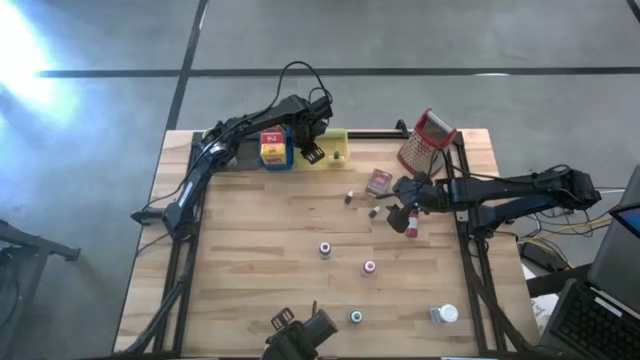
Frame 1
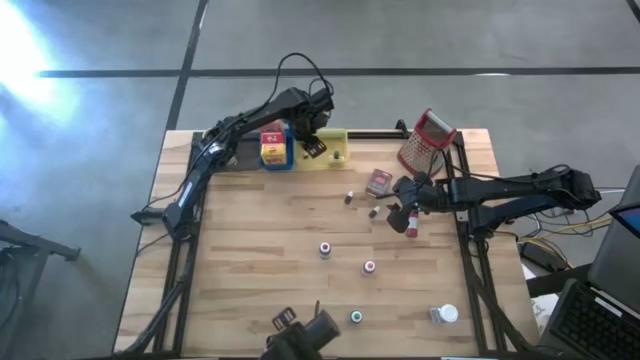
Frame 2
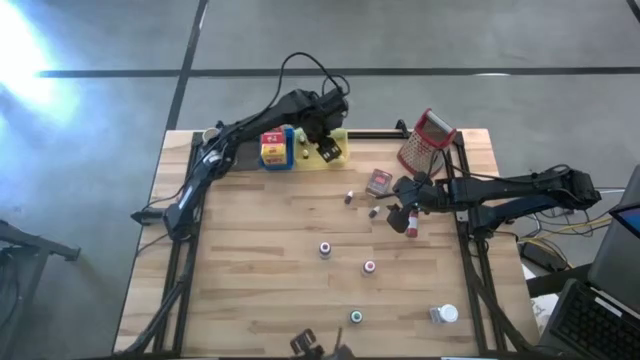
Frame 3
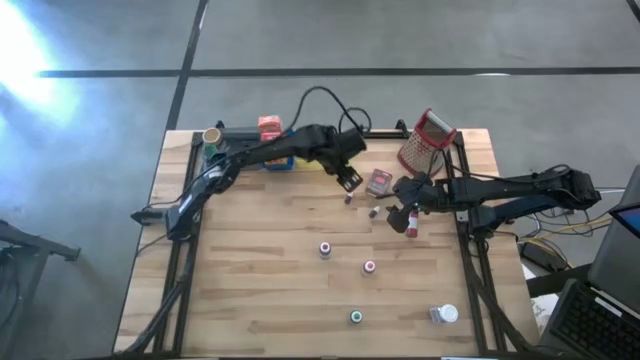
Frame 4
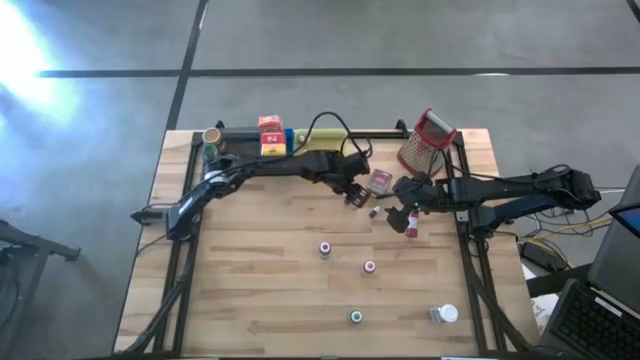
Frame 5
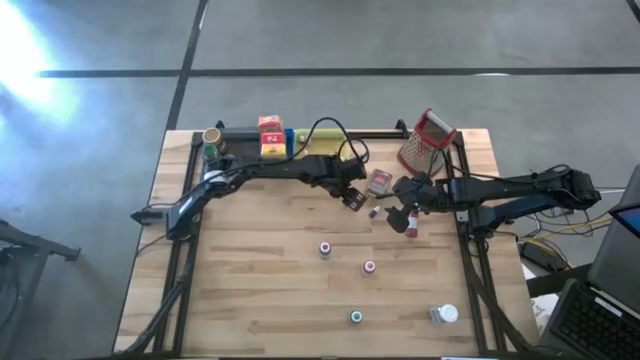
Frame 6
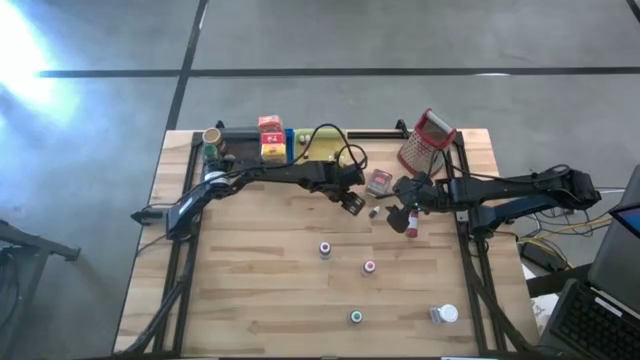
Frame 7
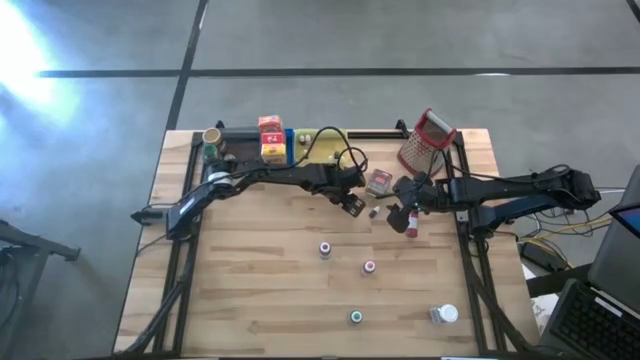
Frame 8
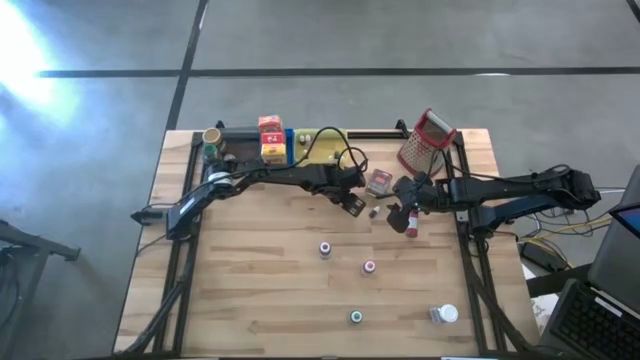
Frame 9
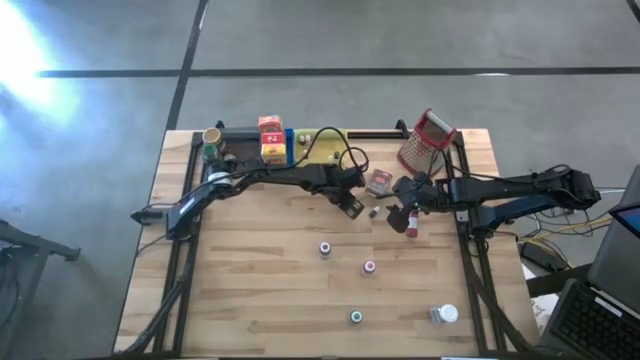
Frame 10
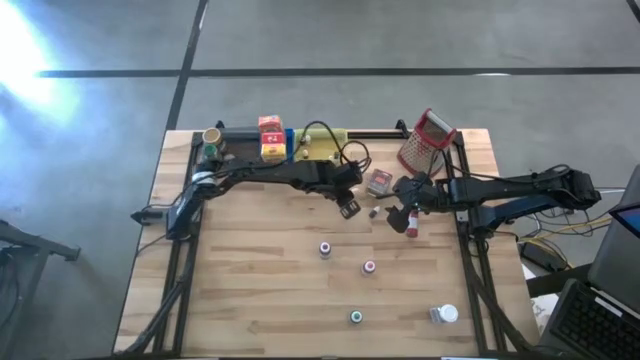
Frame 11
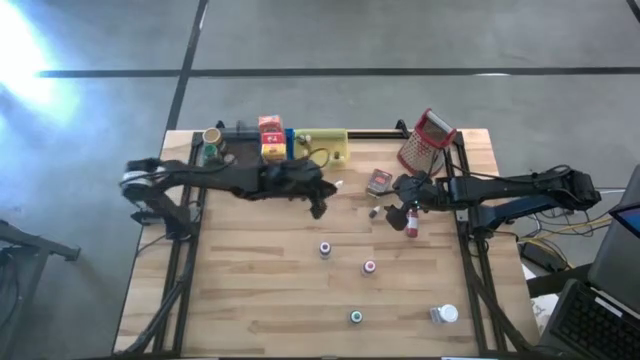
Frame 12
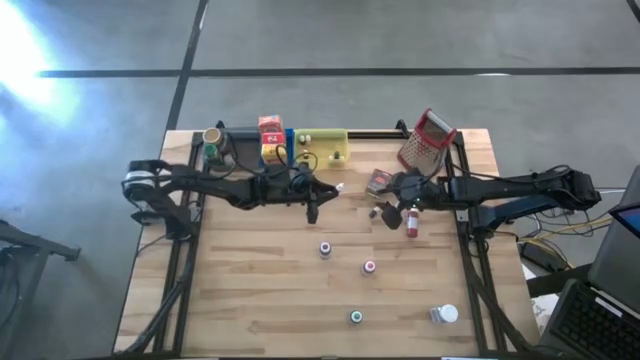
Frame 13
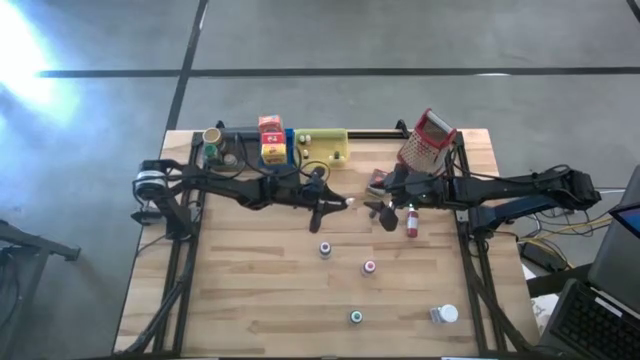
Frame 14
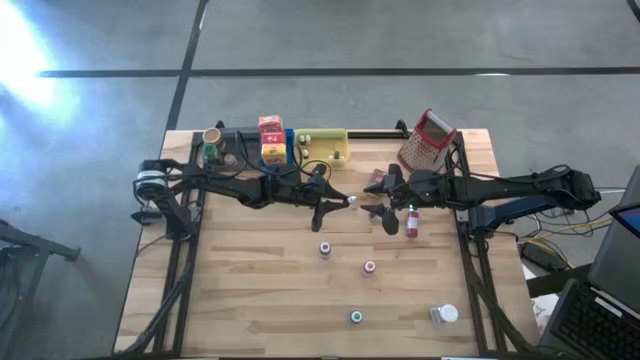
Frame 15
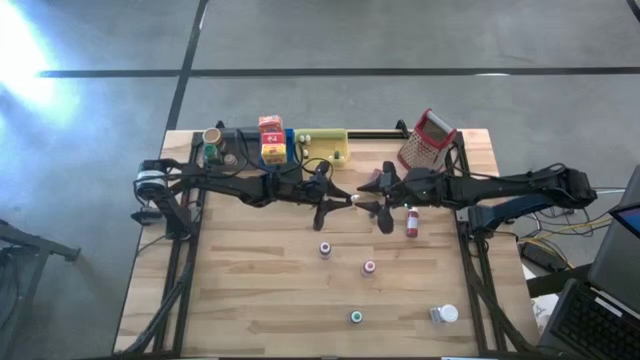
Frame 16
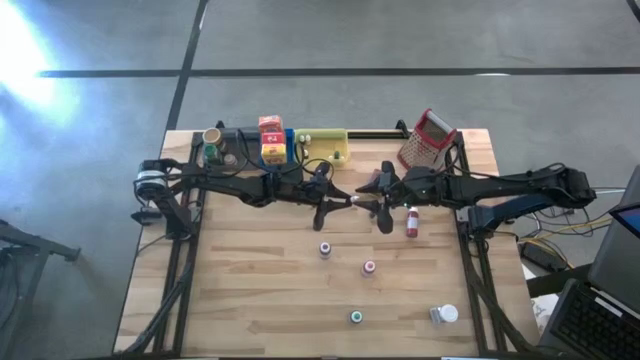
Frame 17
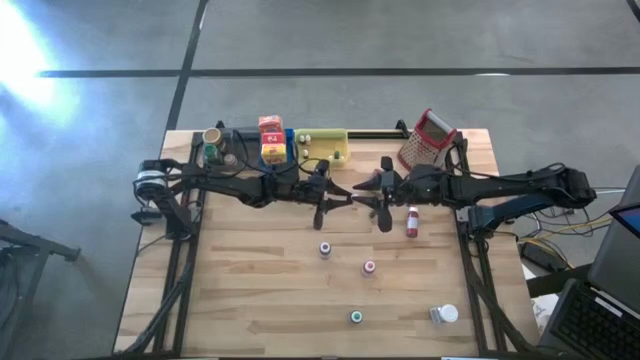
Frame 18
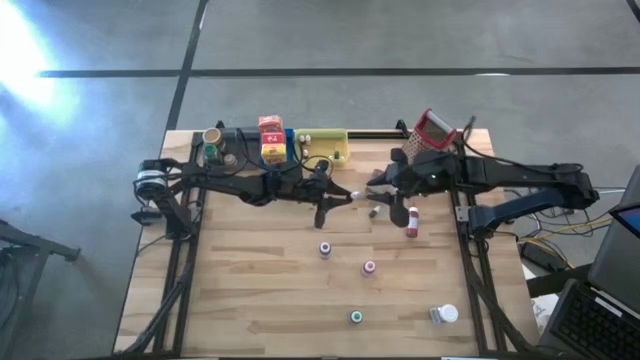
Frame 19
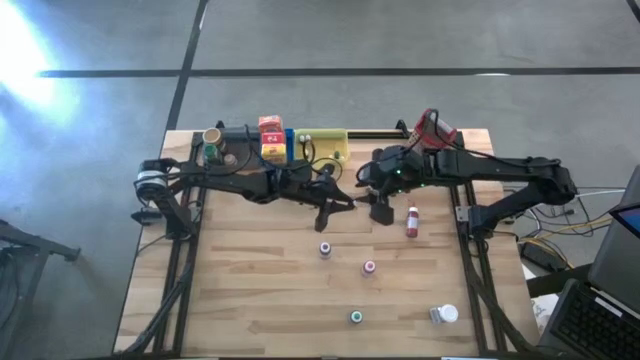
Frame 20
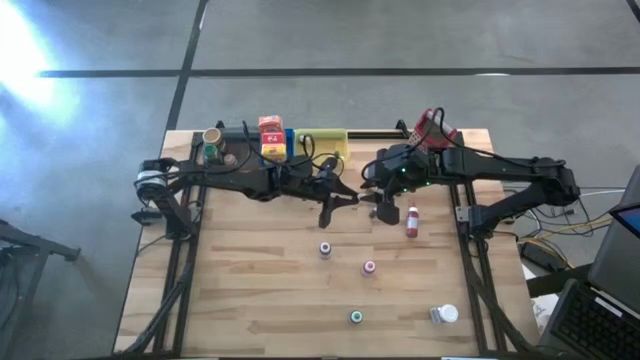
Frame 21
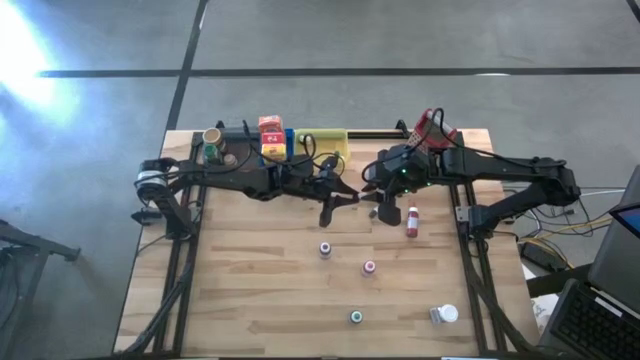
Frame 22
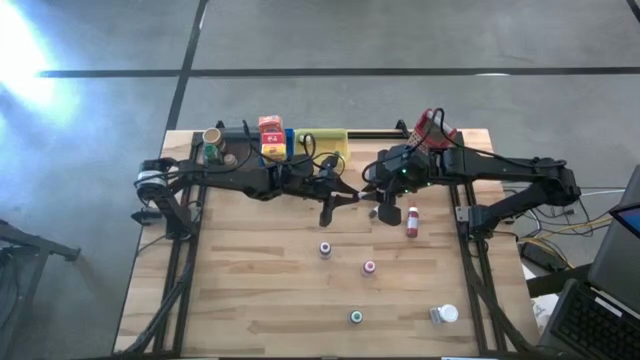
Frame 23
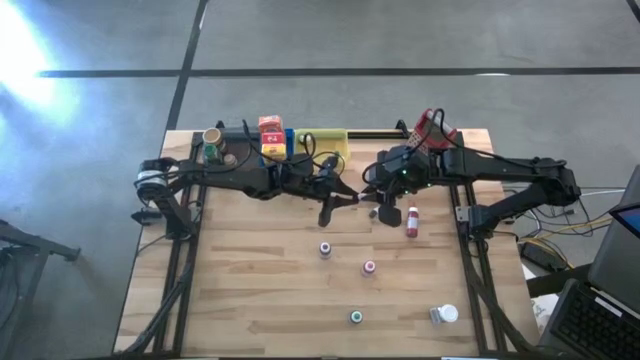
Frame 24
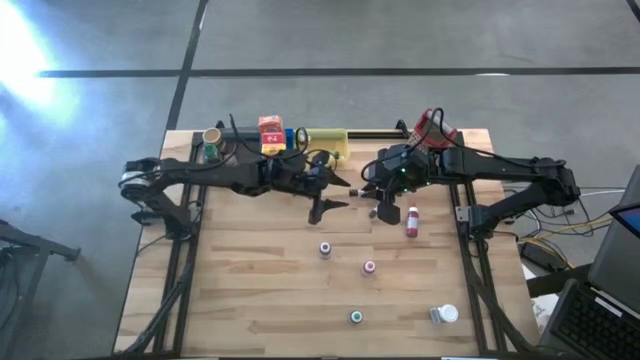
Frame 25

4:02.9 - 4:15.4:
Task: Pick & Place Kitchen Items
Put the small violet food coloring bottle into the yellow bin

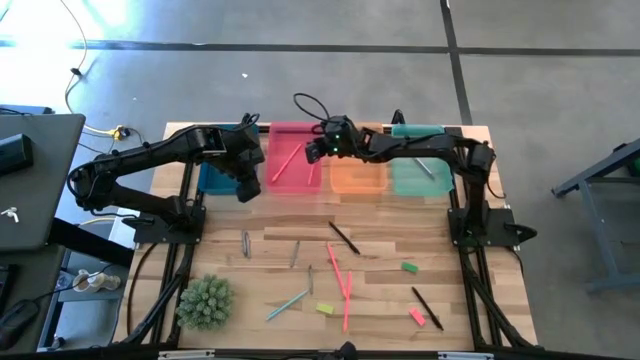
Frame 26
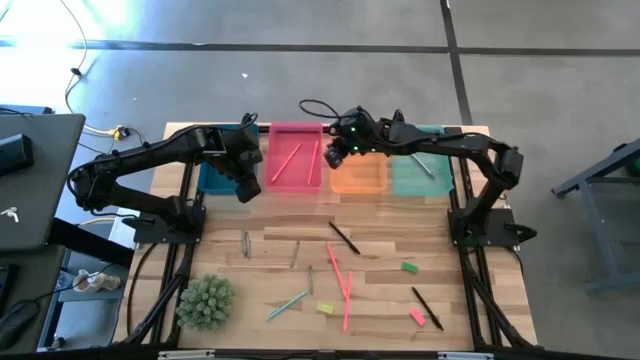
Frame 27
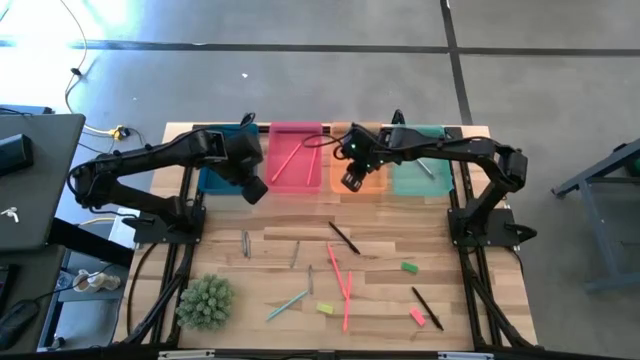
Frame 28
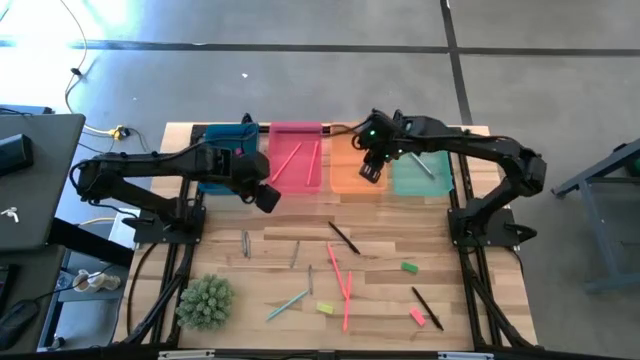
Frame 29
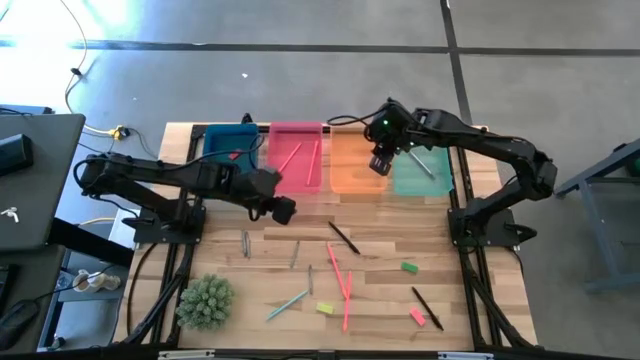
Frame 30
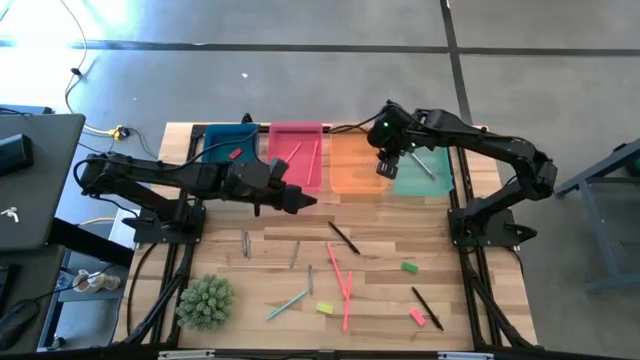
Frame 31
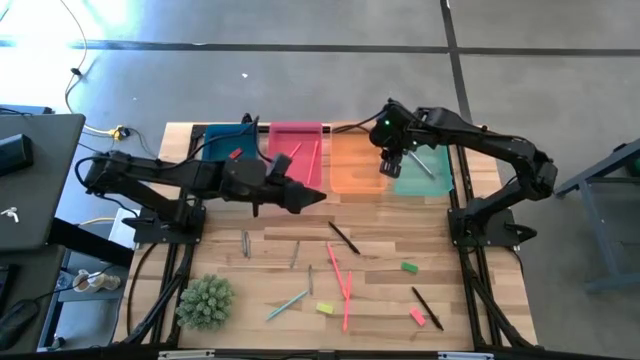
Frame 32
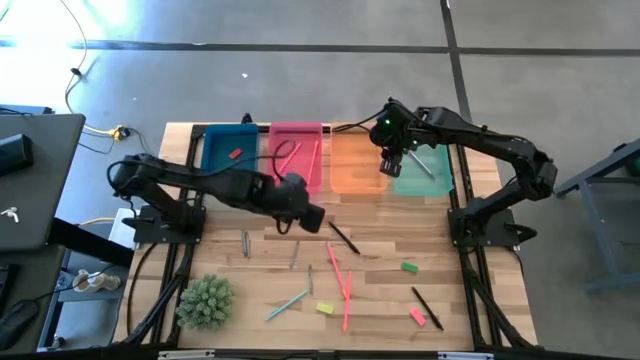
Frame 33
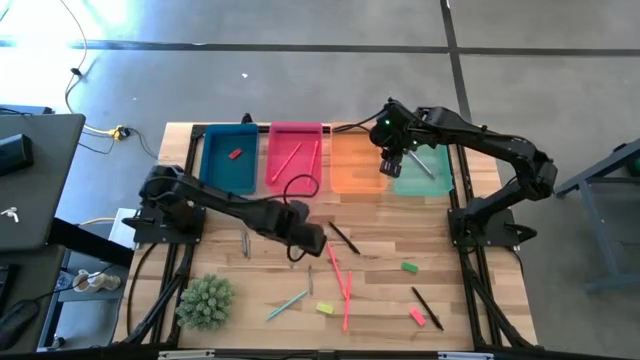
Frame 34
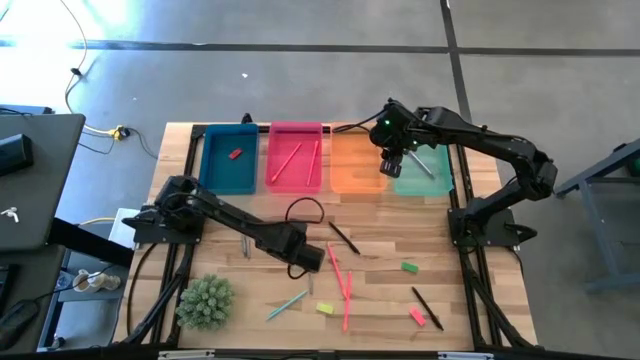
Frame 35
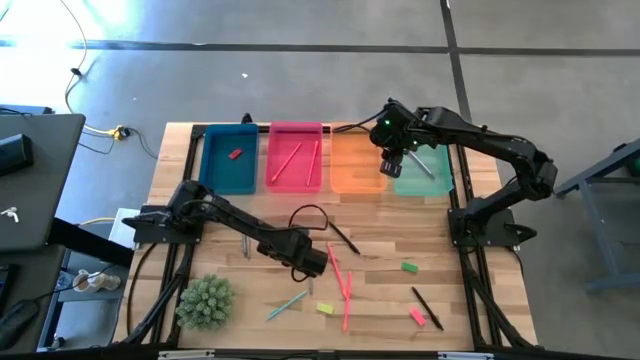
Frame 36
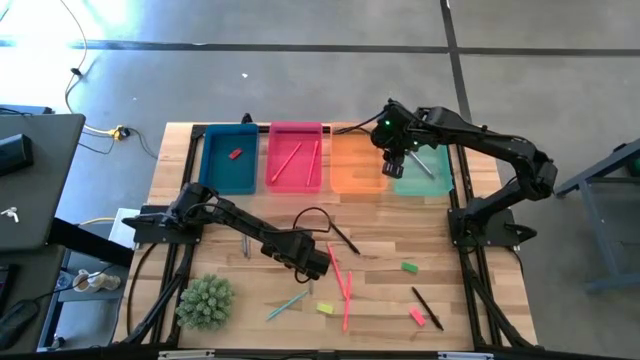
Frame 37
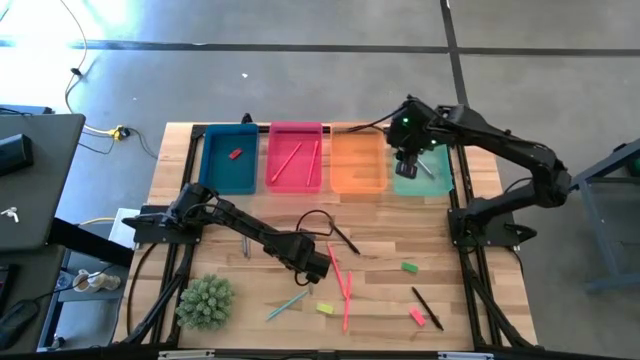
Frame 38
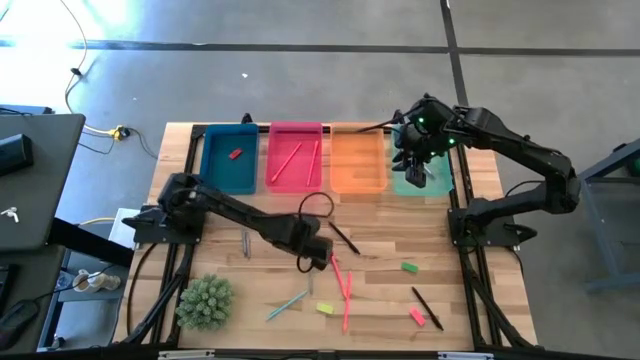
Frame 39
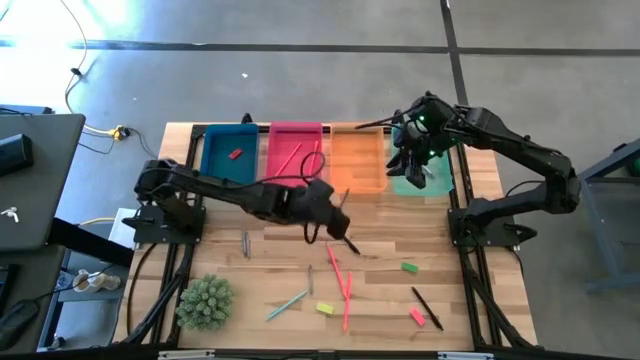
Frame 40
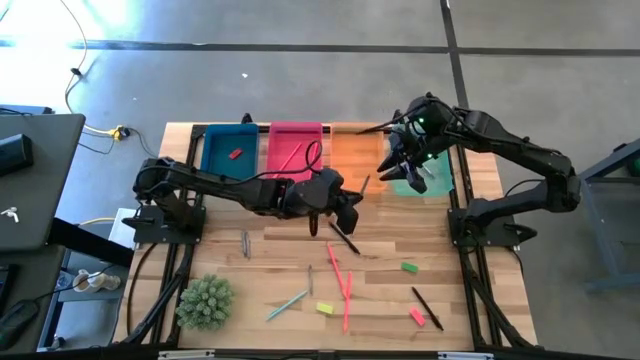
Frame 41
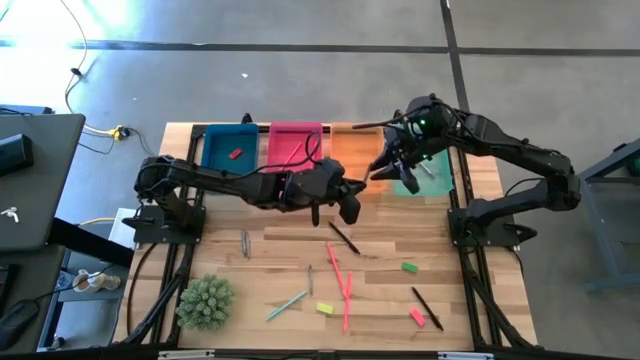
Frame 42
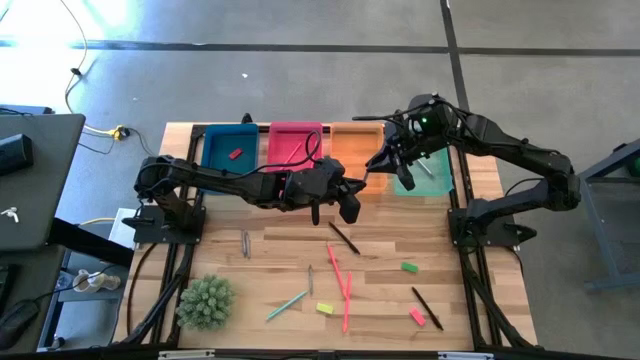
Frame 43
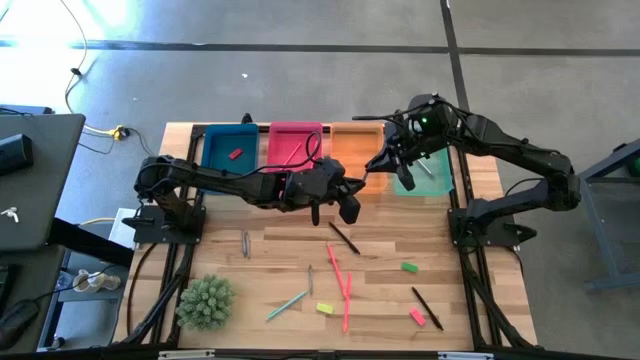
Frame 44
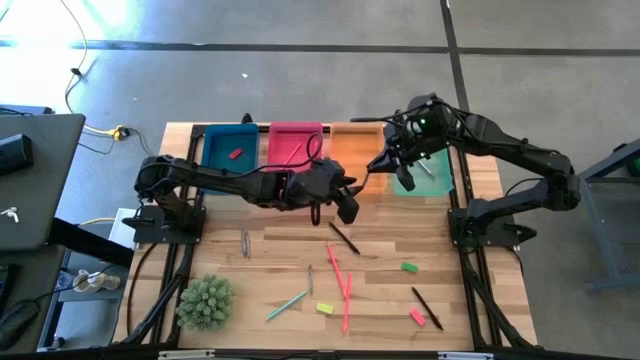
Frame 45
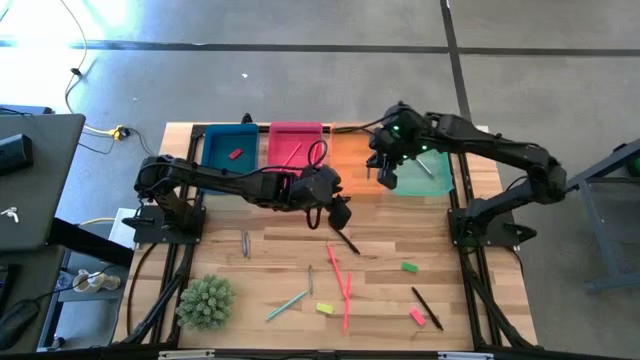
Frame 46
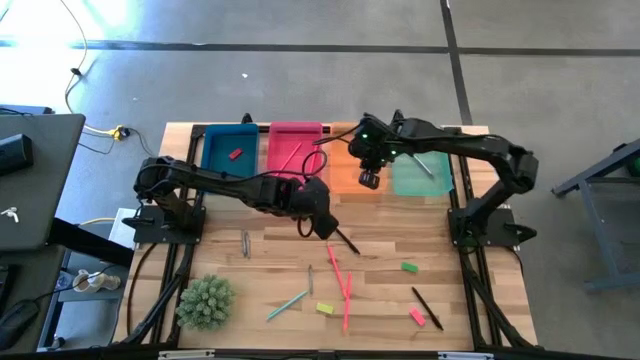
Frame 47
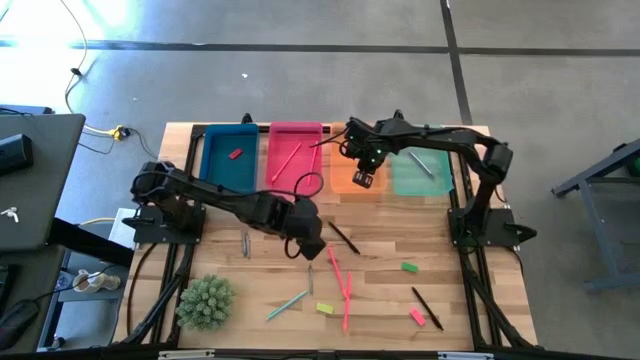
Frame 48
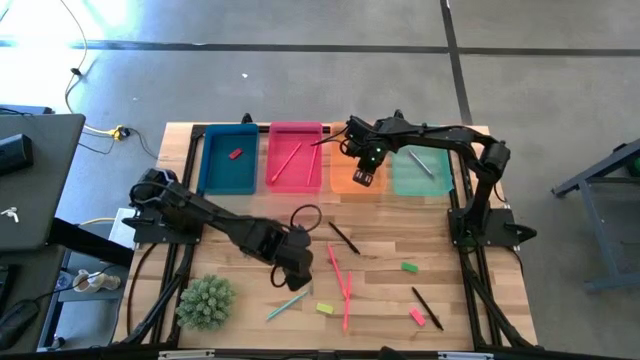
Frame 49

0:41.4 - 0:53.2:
Task: Sort crayons/erasers/pens/pencils in bins
Put the gray crayon into the orange bin
